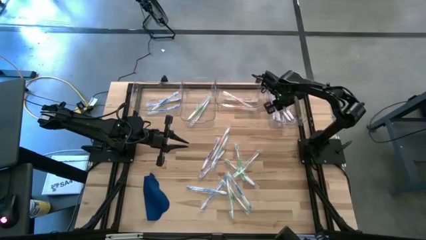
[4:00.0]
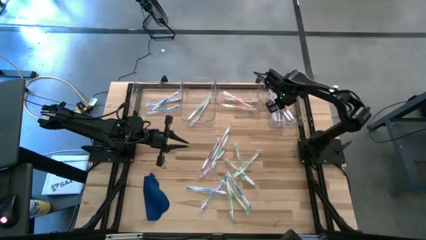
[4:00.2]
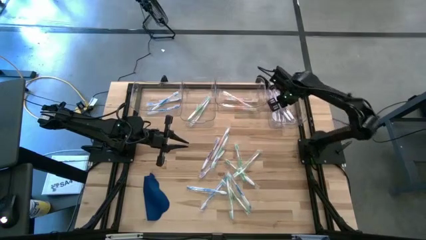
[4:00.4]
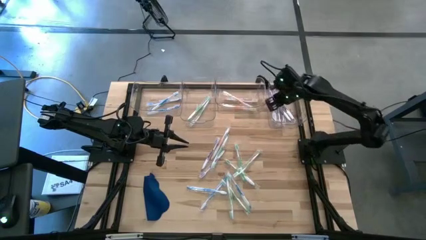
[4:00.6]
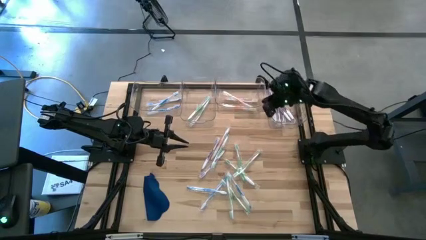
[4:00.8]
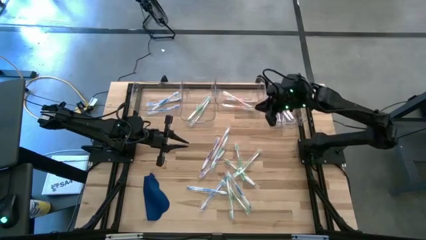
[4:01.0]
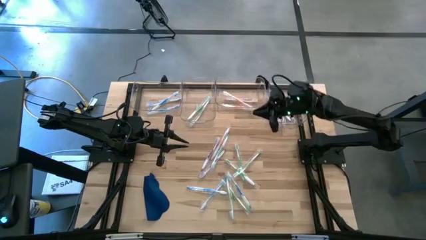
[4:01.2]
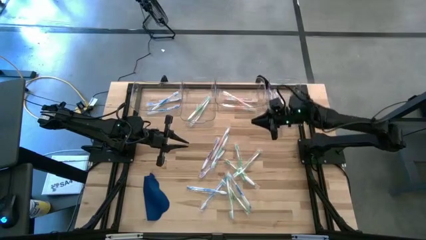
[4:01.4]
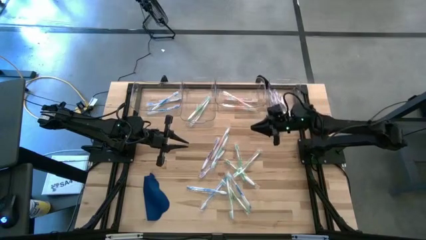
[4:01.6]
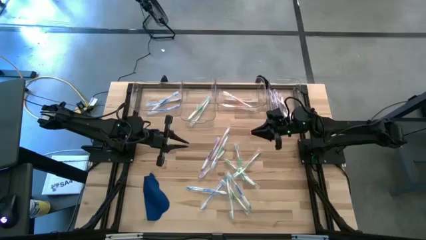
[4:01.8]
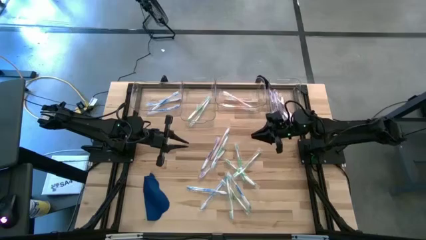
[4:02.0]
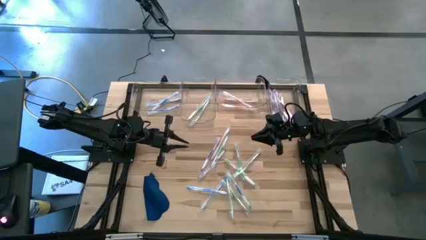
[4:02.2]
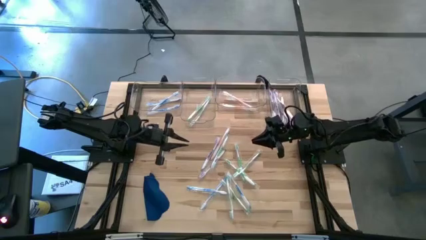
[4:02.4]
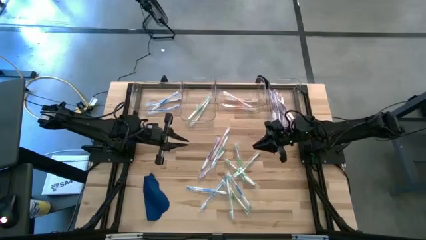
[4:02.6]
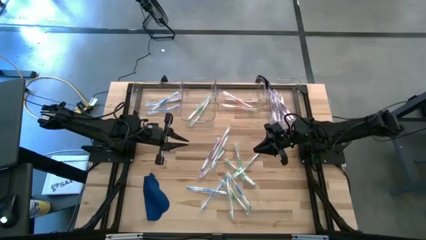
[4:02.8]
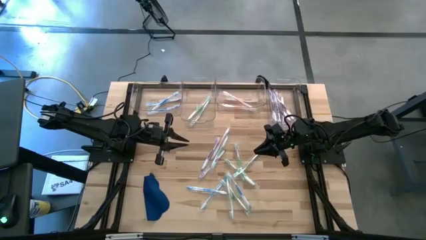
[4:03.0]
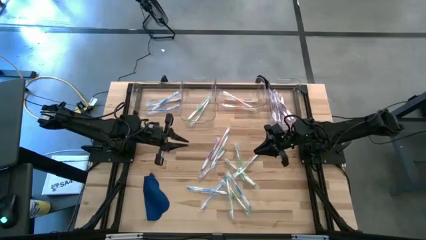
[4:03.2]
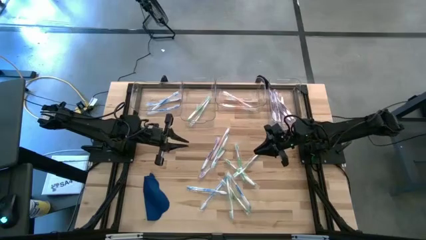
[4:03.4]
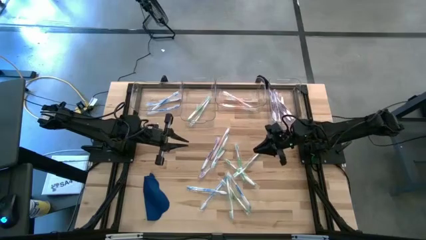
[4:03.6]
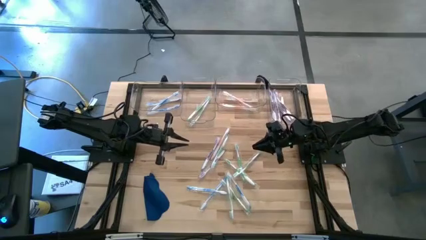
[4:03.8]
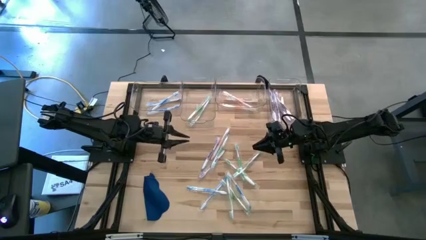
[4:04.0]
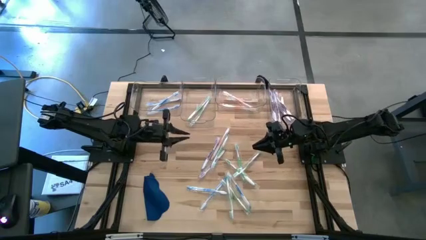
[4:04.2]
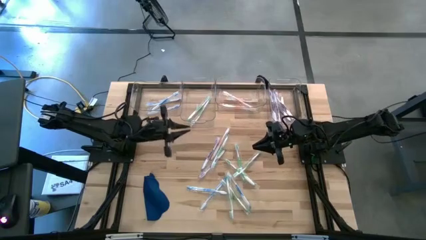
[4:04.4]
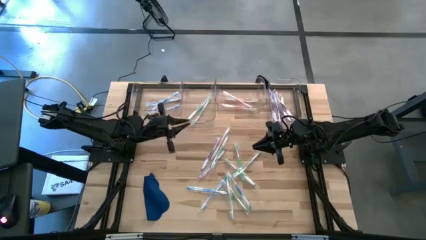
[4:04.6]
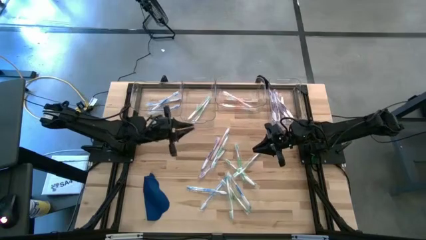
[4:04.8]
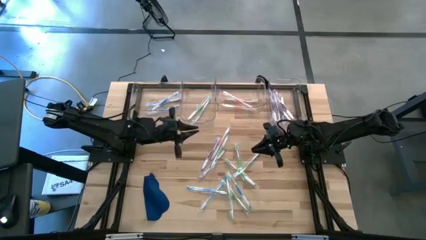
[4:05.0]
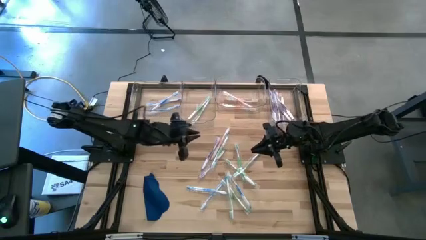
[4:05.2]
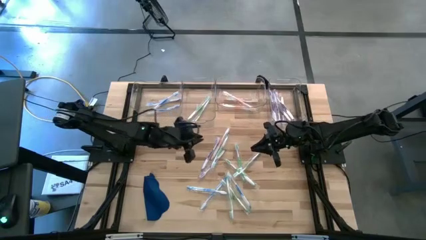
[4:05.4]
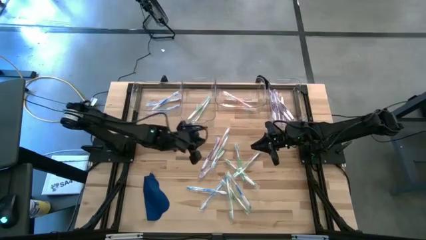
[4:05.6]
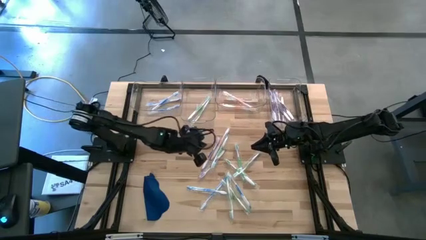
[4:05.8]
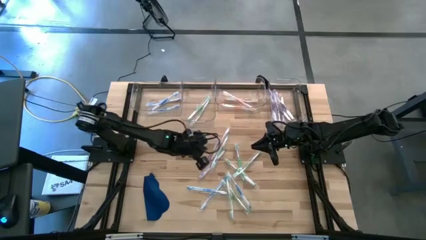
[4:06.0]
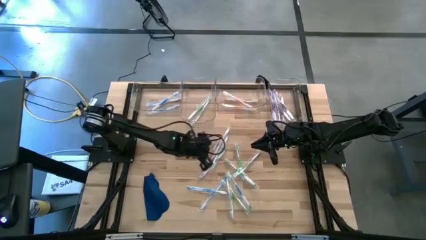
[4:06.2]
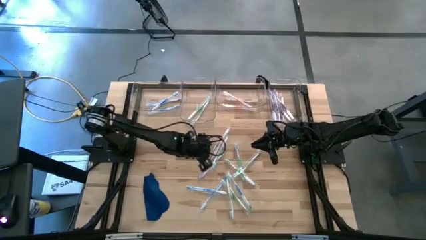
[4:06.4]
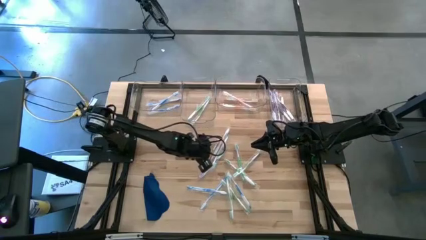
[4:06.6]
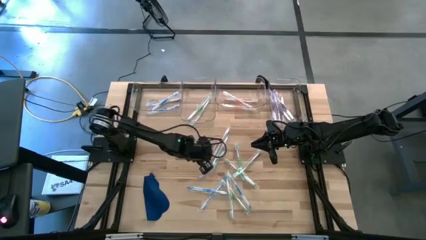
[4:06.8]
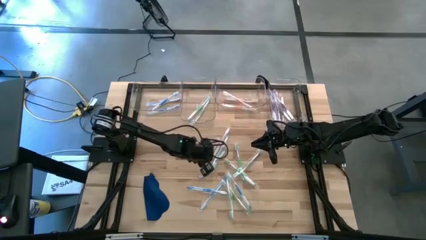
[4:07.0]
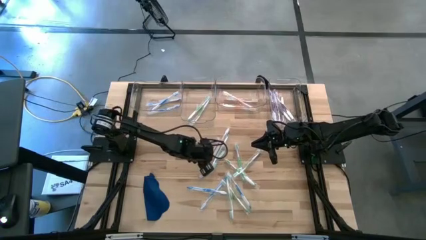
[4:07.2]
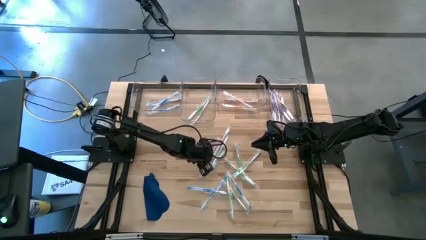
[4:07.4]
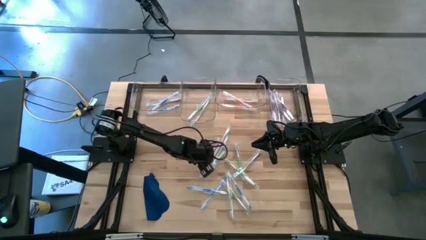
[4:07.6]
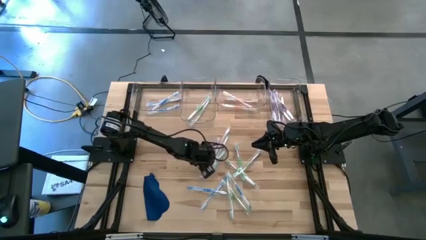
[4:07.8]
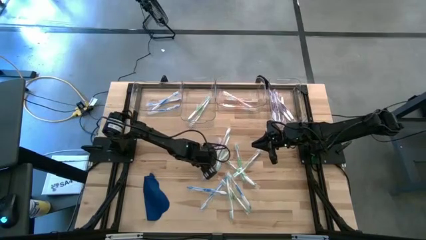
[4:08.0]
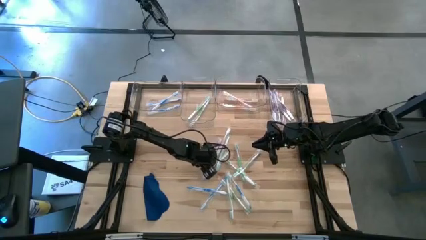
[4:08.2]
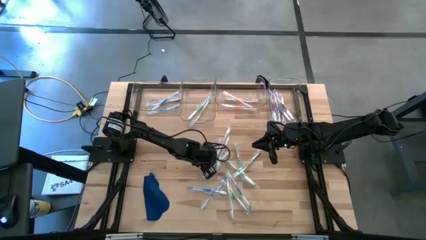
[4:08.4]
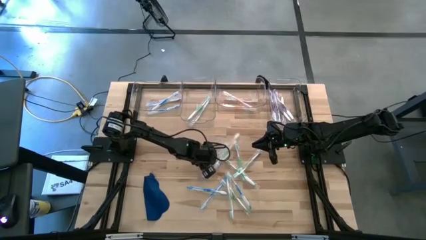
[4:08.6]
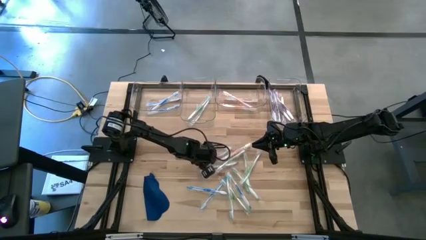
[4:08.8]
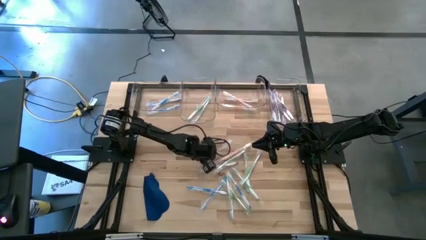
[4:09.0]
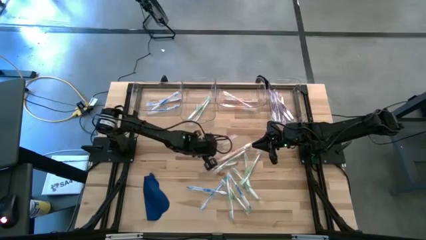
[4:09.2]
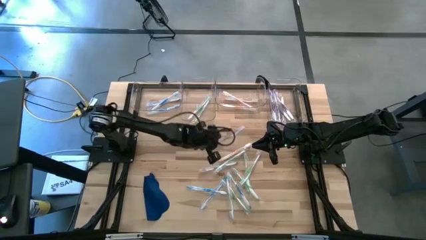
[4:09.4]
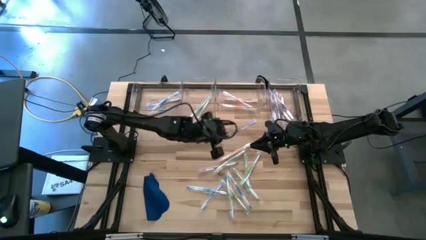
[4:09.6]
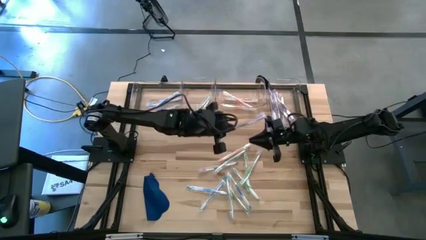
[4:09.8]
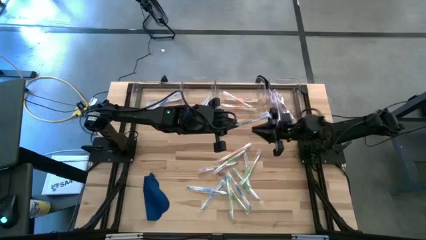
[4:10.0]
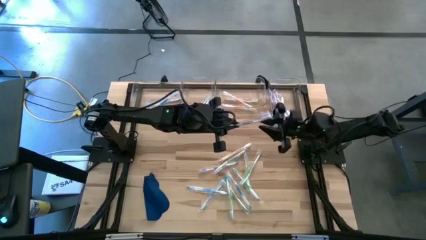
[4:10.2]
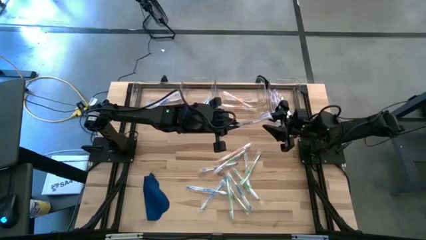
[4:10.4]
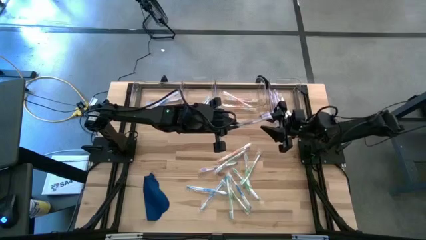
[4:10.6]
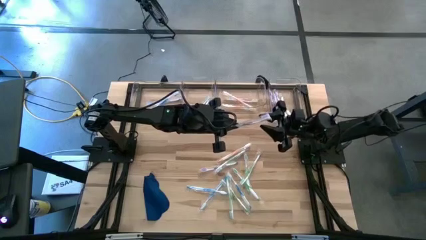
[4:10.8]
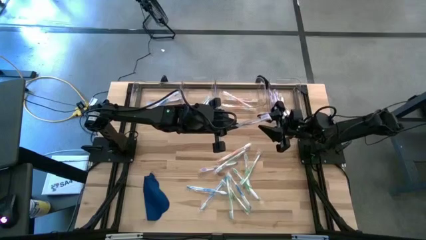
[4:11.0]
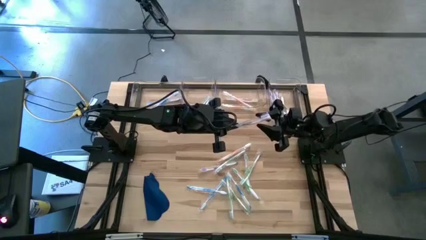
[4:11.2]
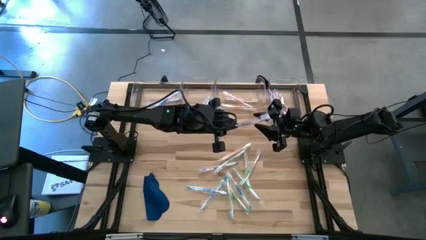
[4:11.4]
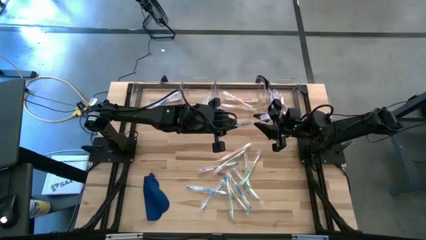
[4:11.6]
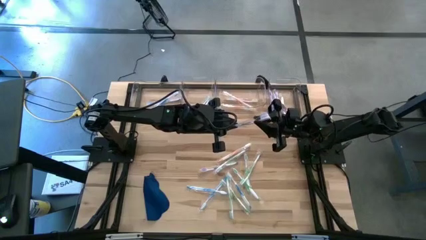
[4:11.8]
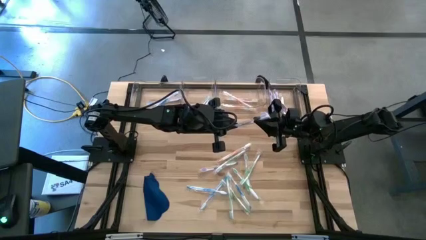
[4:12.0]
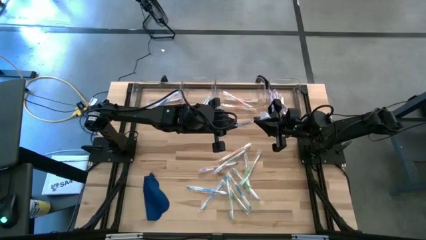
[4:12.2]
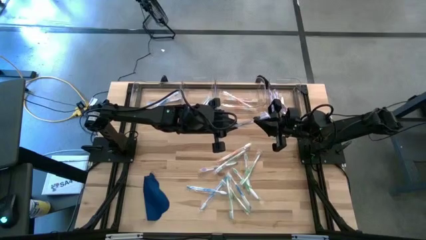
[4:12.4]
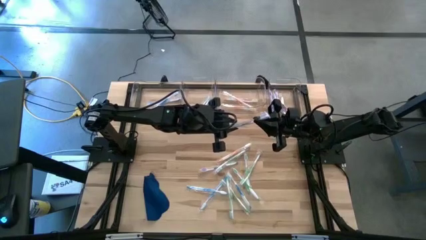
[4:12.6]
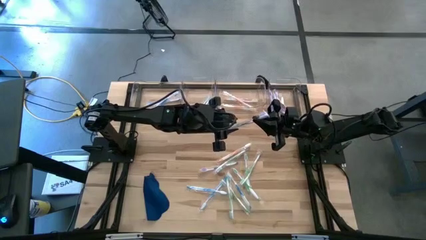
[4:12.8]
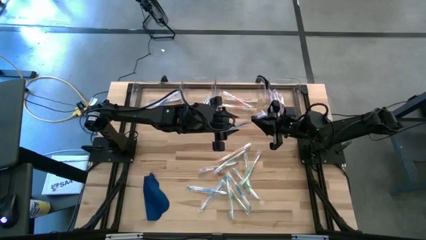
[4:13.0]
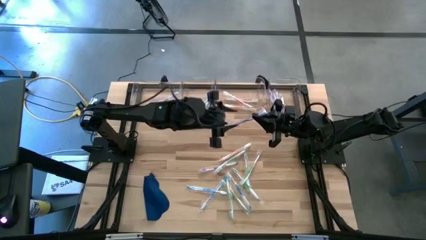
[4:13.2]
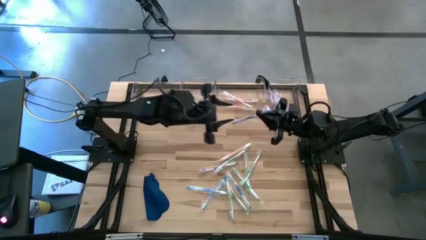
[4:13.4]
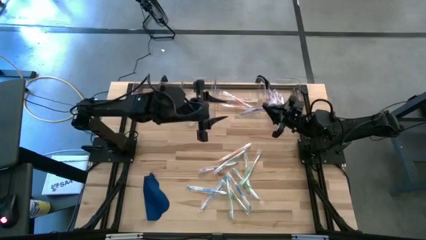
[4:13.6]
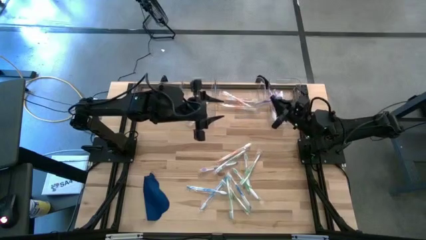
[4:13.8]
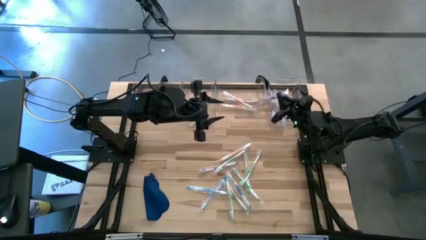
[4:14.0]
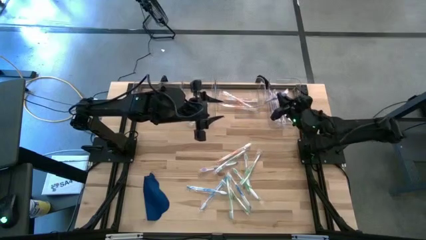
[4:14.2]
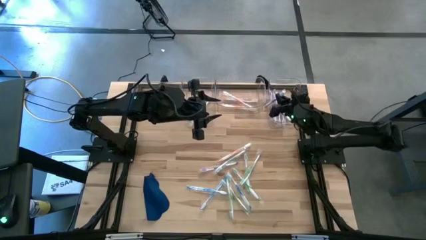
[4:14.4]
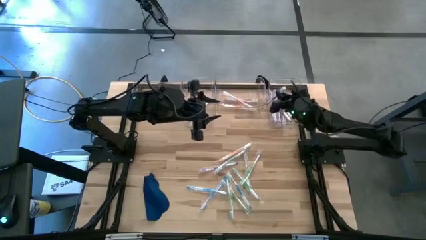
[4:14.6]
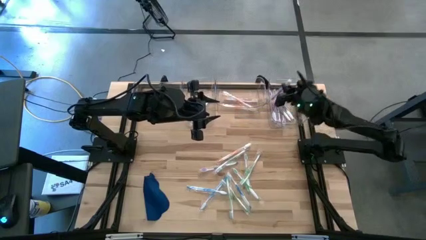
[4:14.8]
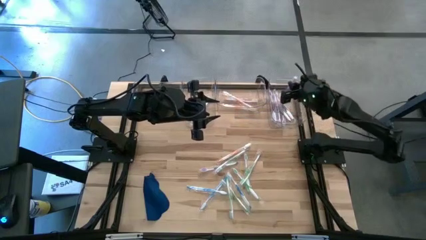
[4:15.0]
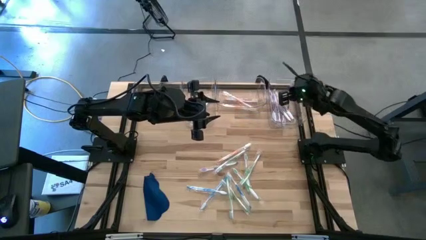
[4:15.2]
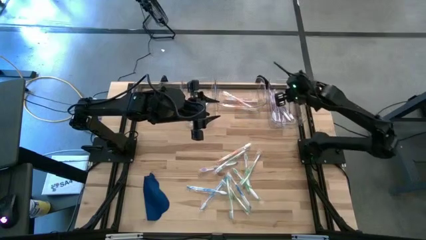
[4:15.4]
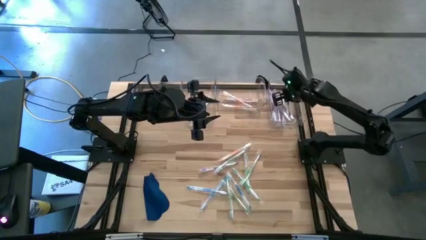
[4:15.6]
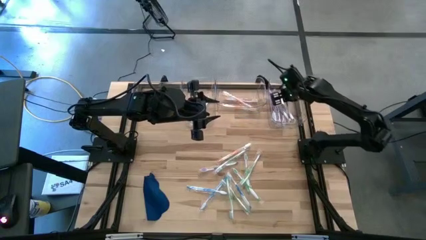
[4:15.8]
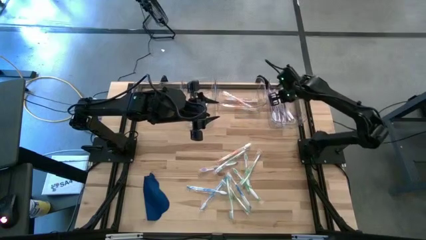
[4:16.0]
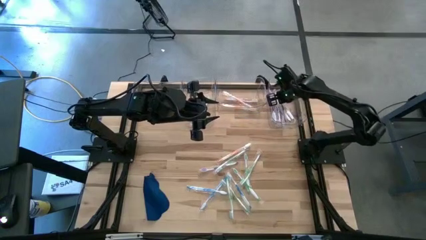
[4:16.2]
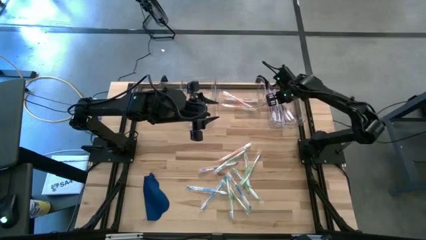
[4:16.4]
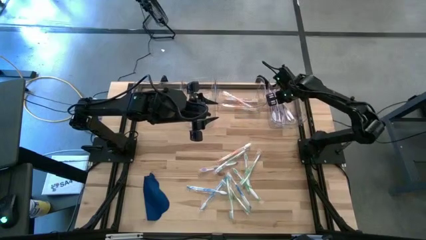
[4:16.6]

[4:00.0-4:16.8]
Task: Pick & Place Toothbrushes
Put the purple toothbrush into the right transparent bin
